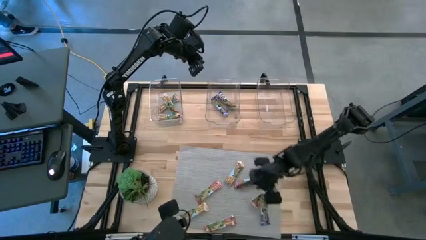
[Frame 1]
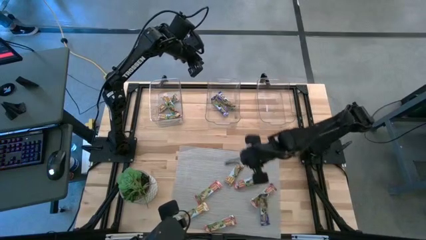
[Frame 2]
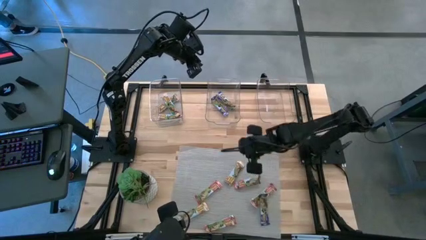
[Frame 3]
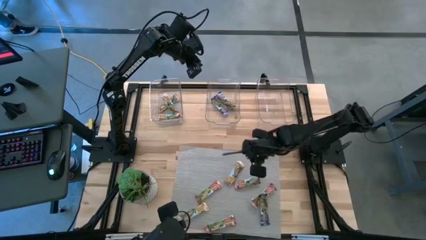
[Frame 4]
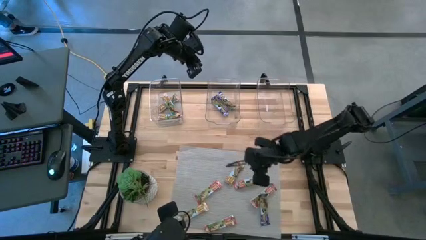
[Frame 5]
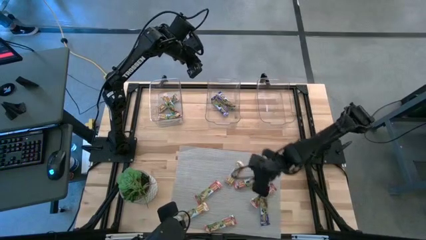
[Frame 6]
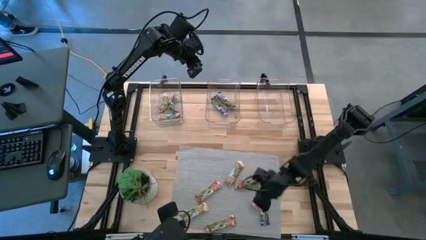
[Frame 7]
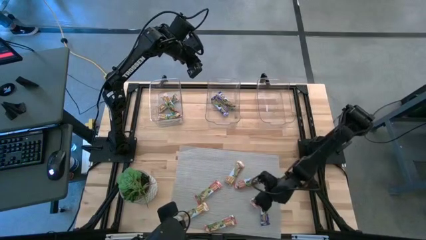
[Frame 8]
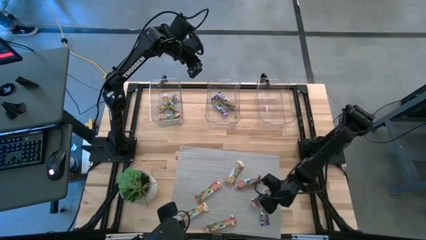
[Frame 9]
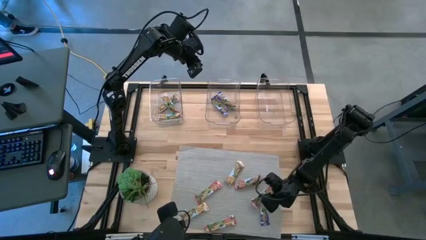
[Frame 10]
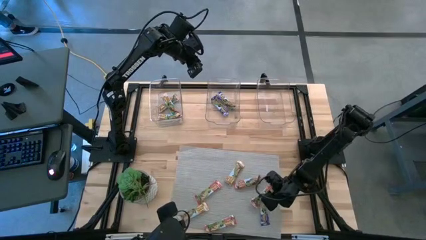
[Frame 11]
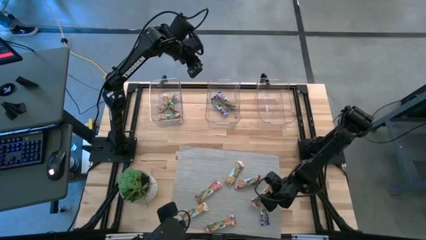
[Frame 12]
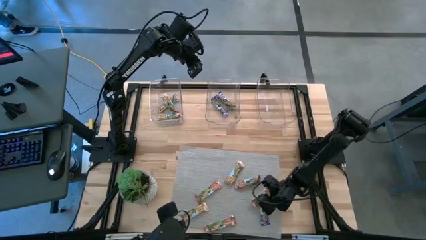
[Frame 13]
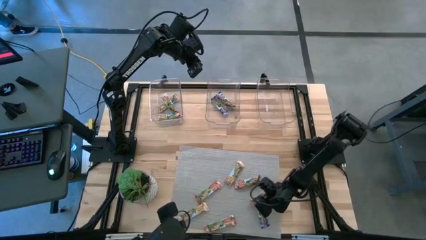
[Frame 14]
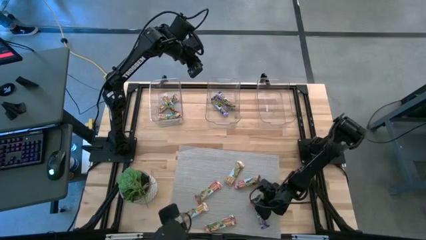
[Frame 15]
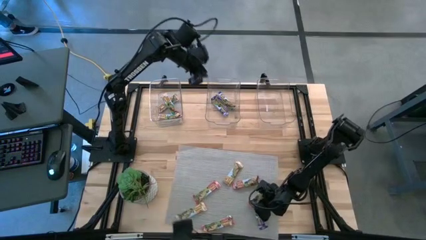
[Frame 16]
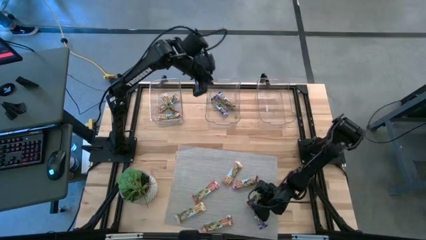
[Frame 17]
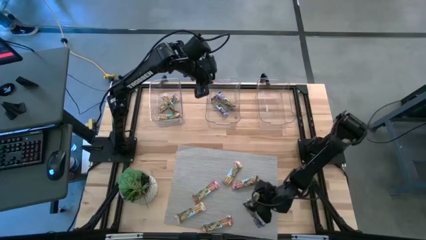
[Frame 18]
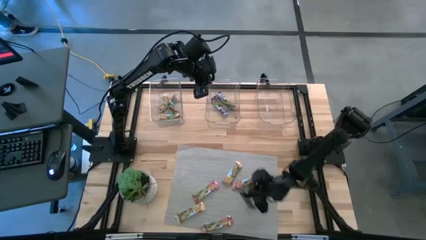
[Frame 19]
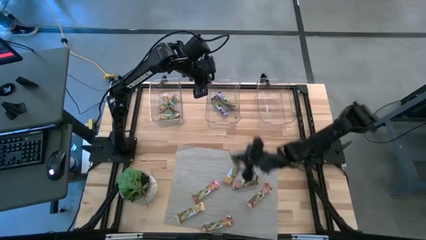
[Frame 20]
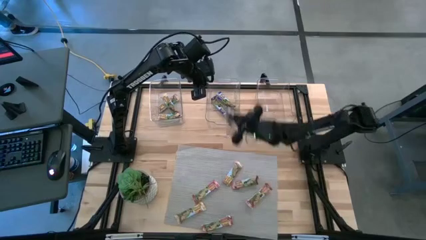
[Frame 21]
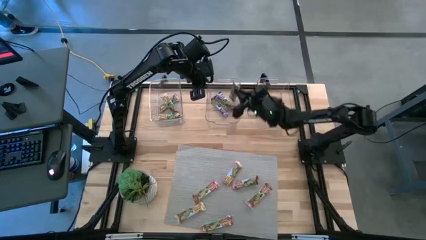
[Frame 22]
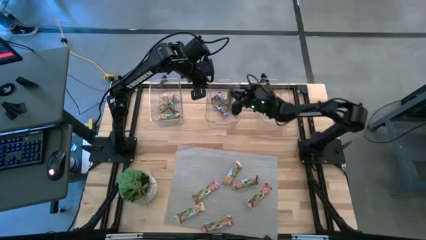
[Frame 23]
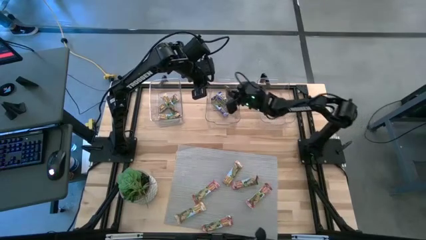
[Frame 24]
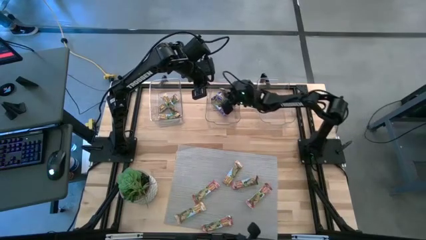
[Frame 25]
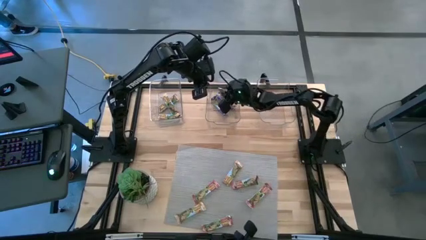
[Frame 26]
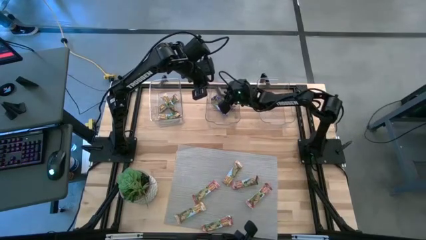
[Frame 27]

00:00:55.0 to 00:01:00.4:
Task: Pick and place Granola Bars by type
Put the blue granola bar into the middle transparent bin

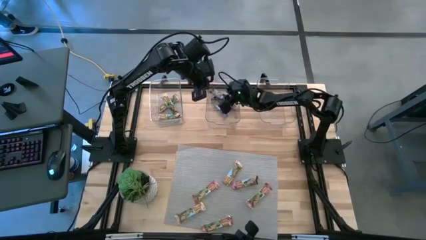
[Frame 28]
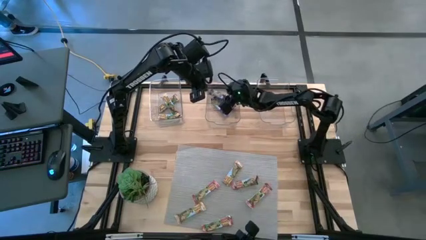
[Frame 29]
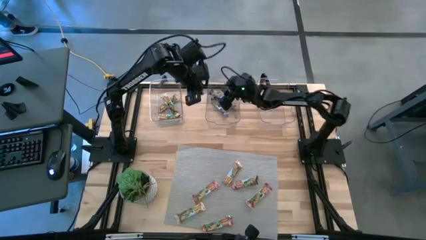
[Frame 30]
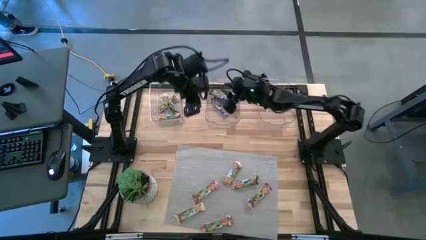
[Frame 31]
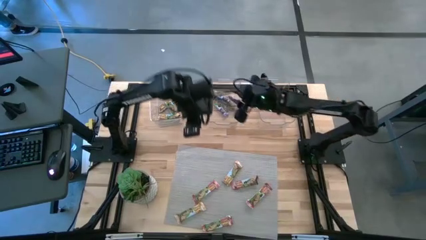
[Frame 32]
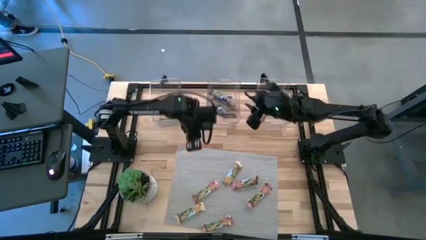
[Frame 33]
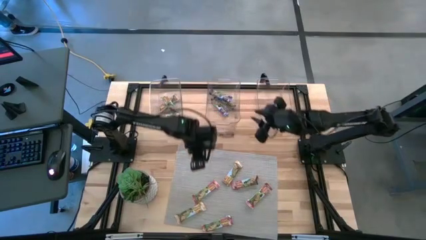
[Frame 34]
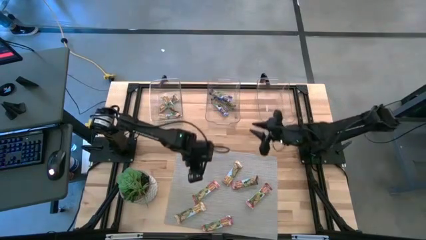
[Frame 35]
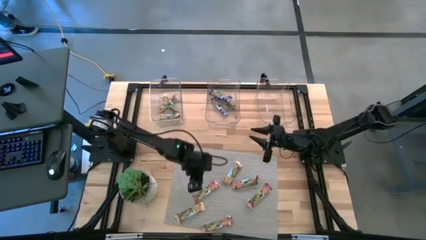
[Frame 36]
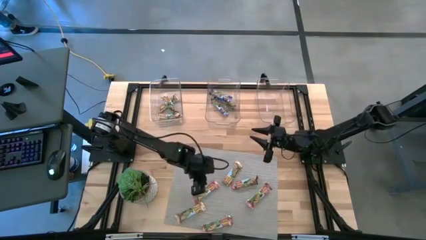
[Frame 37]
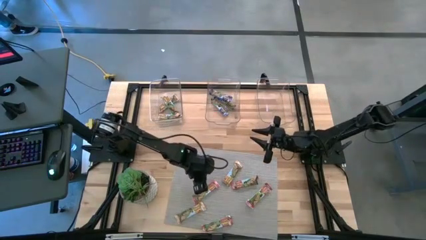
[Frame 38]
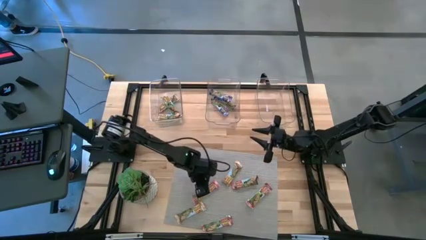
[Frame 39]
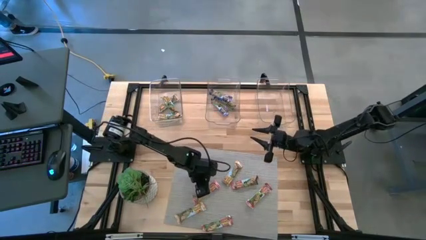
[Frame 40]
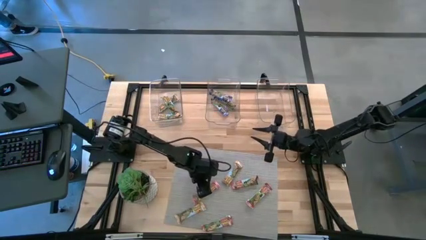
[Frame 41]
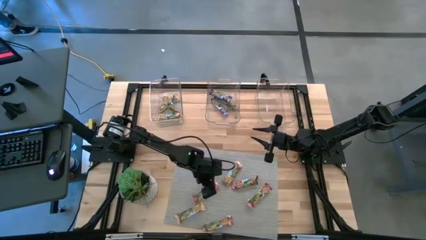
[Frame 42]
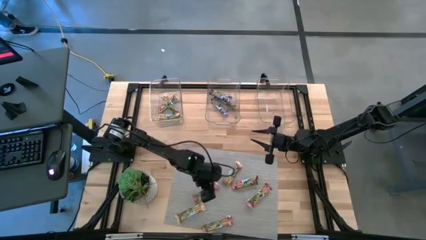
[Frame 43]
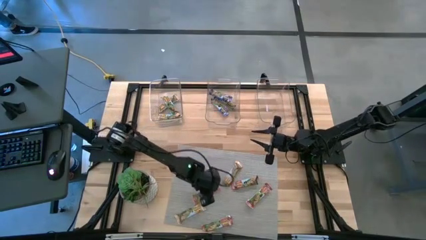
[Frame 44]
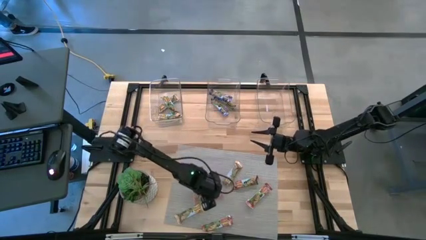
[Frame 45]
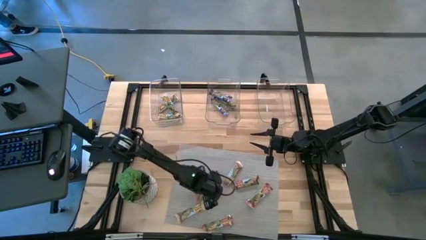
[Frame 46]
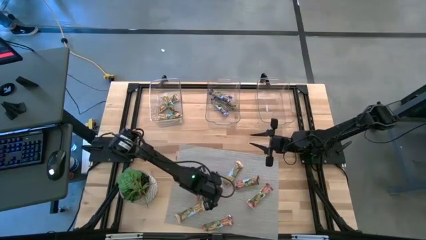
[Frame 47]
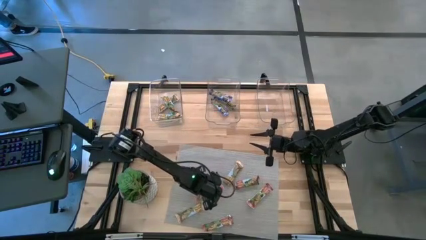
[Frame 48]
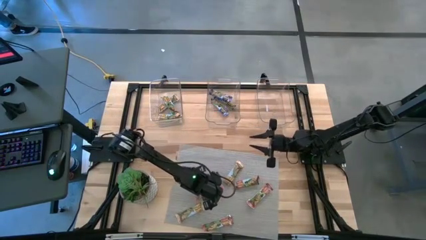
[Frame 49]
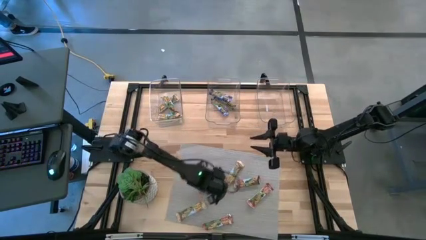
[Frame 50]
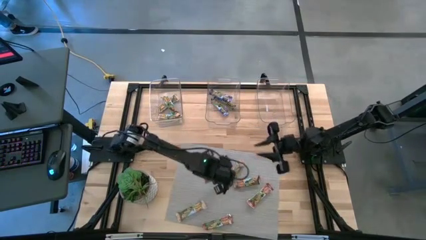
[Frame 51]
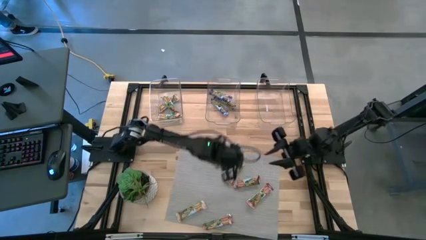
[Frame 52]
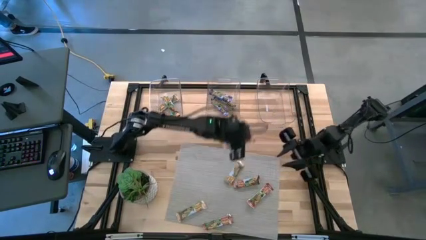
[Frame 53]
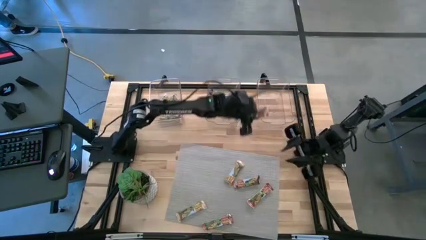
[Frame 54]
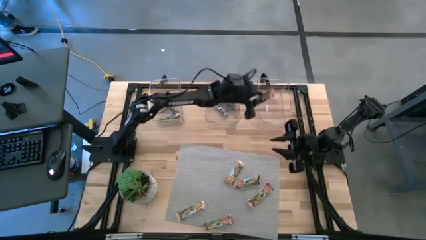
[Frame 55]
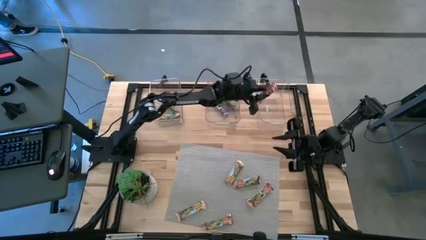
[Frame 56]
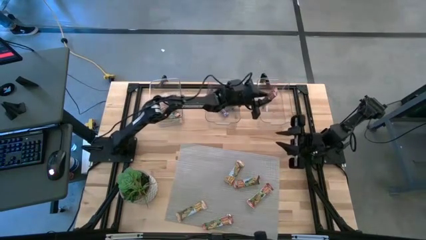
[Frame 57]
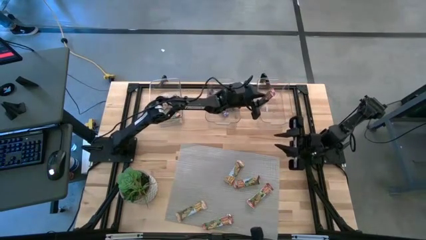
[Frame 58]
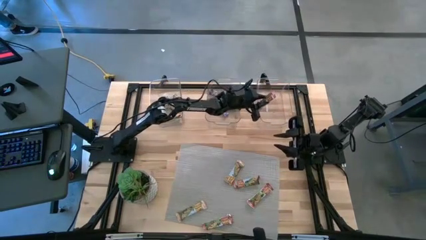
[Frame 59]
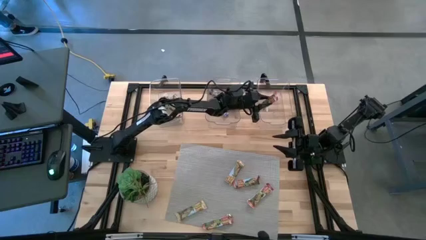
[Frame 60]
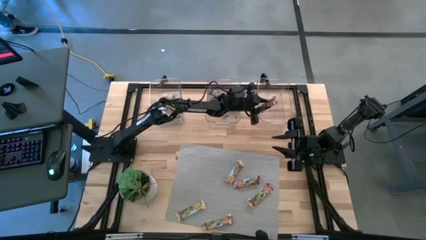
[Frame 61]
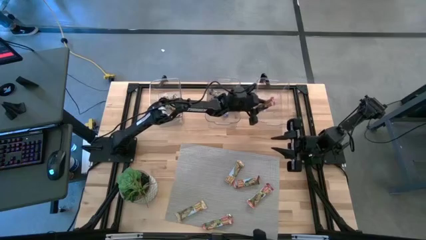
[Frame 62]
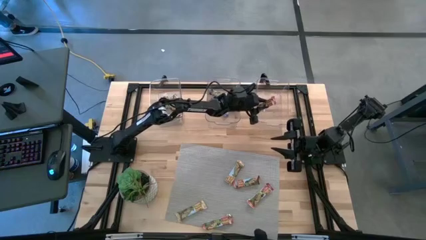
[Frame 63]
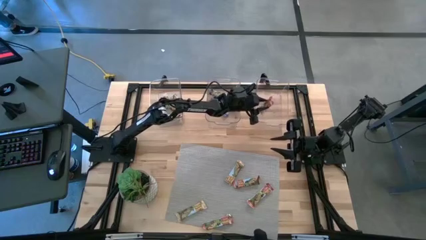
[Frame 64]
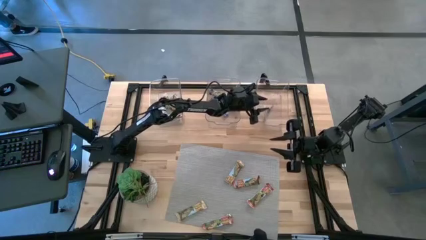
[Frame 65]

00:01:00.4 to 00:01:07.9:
Put the top left red granola bar into the right transparent bin

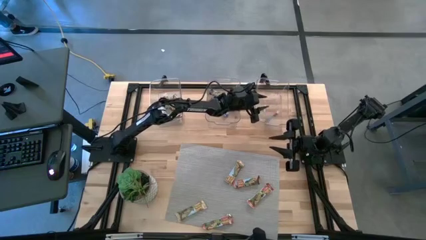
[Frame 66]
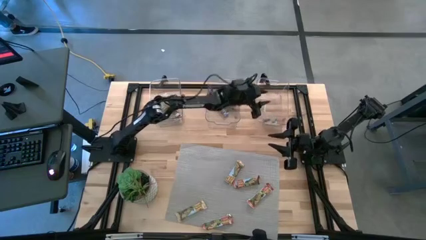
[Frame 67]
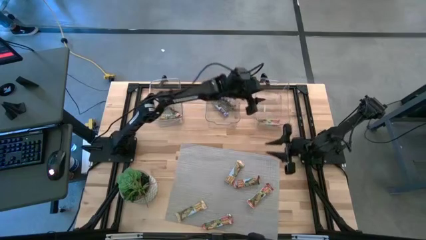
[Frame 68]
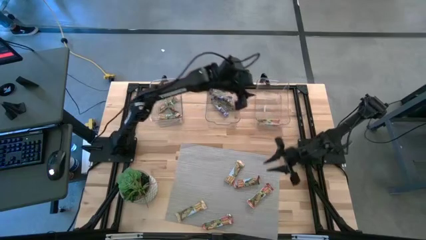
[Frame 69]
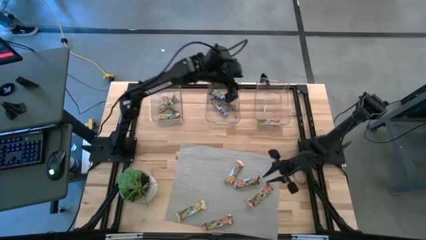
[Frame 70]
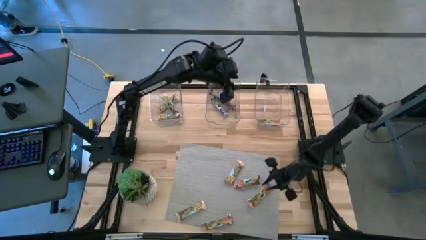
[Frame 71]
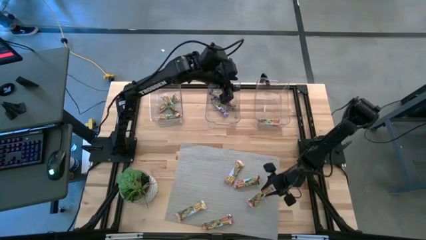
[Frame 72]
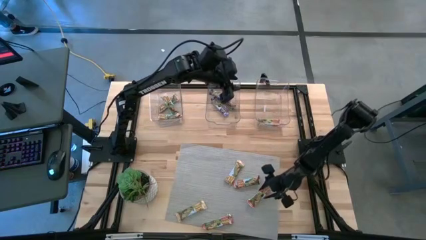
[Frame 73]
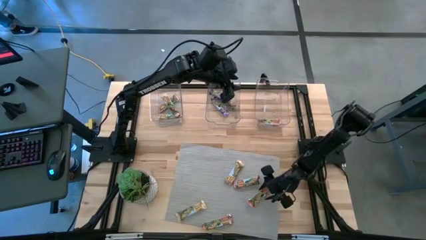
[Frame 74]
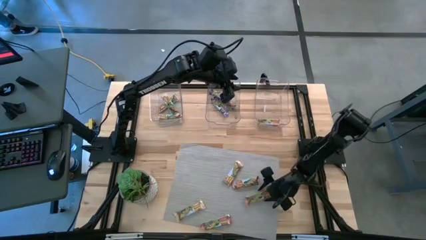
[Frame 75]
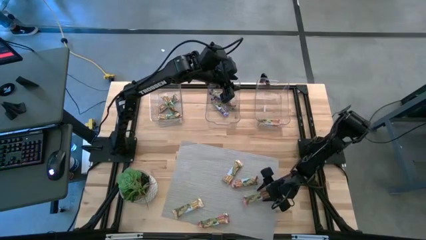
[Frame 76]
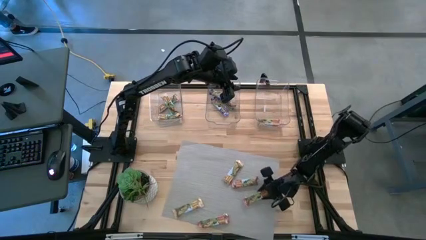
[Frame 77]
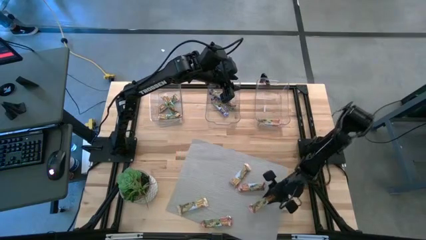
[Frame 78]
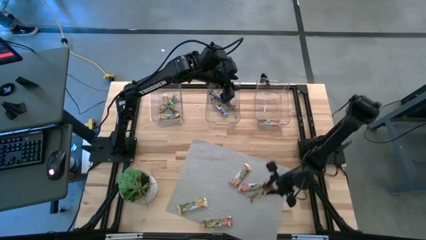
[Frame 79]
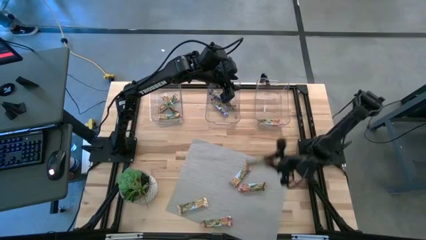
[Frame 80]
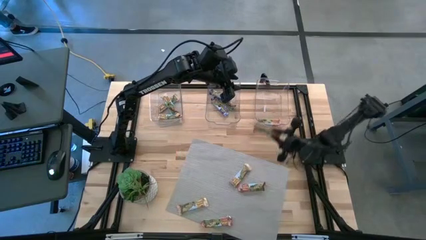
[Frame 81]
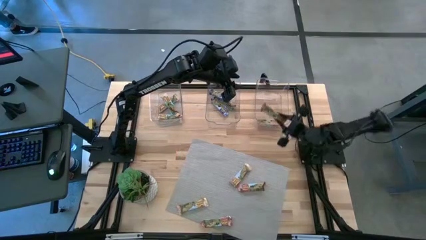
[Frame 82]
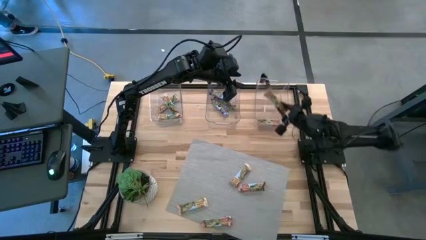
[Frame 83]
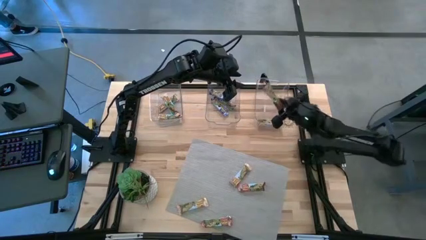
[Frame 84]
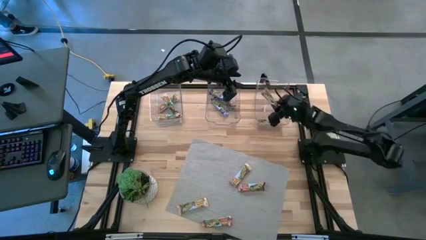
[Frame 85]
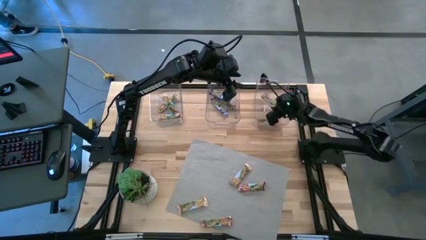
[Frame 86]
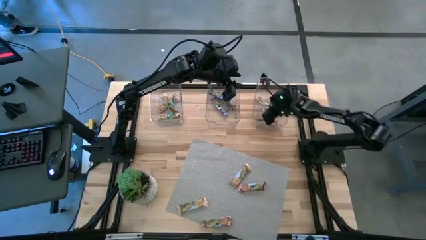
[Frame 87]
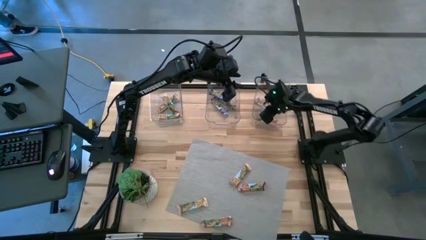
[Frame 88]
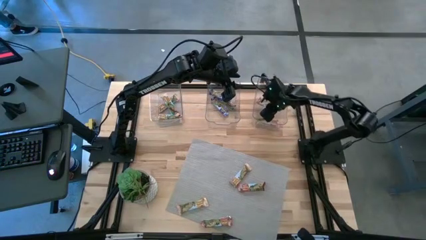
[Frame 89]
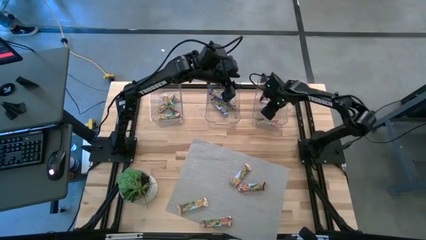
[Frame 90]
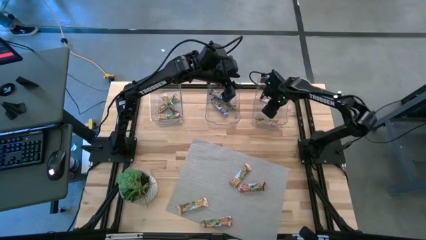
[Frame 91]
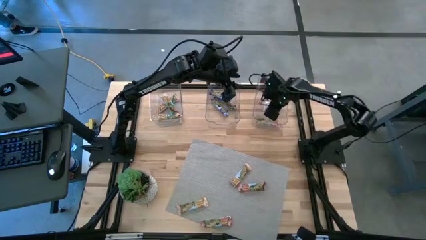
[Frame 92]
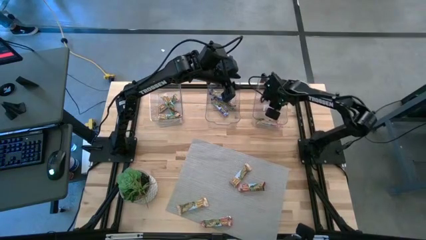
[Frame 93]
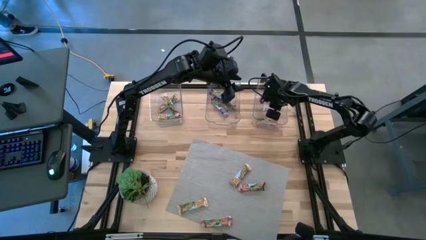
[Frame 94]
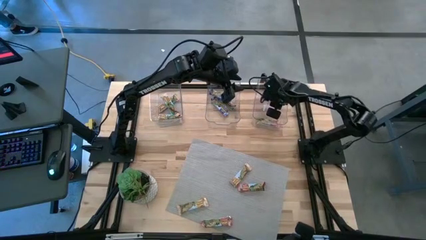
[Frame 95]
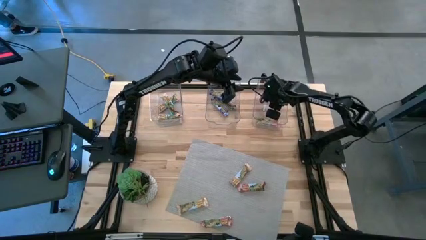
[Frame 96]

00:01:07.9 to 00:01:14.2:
Put the top right red granola bar into the right transparent bin
